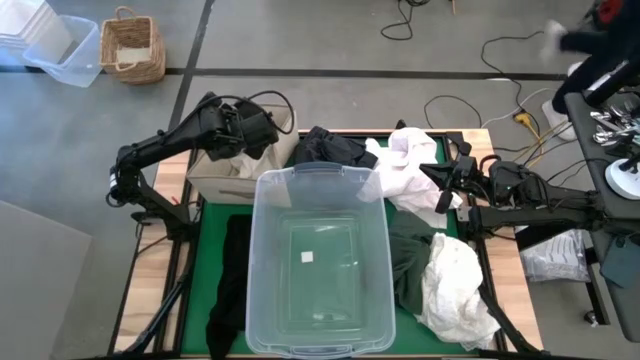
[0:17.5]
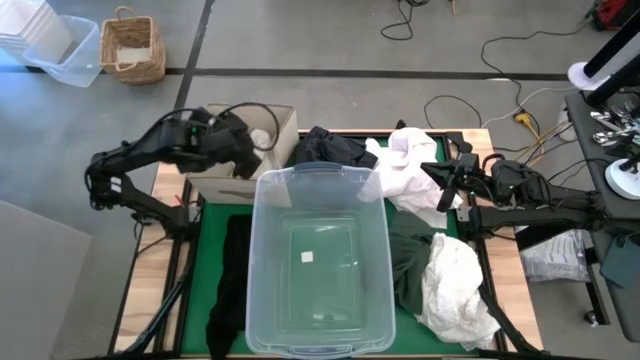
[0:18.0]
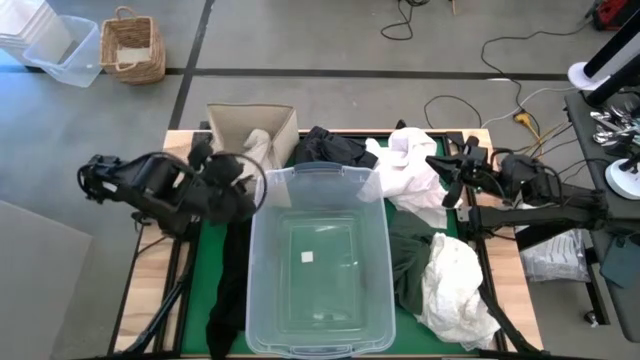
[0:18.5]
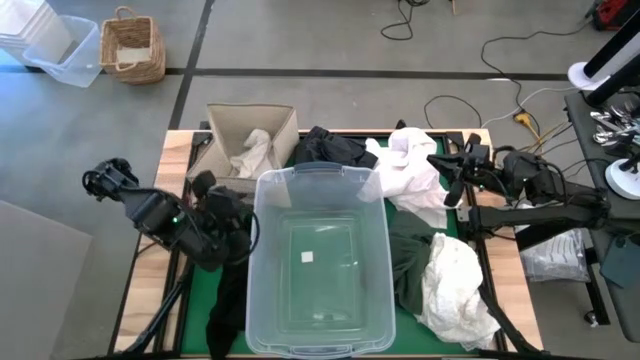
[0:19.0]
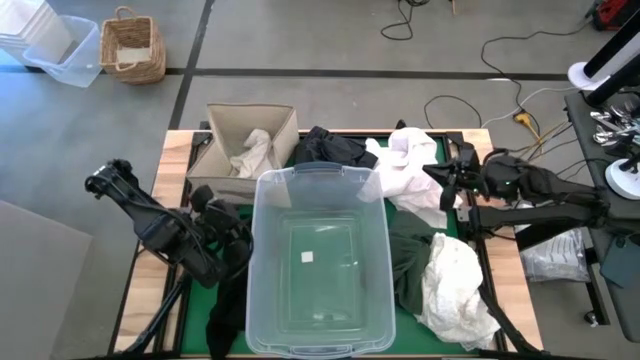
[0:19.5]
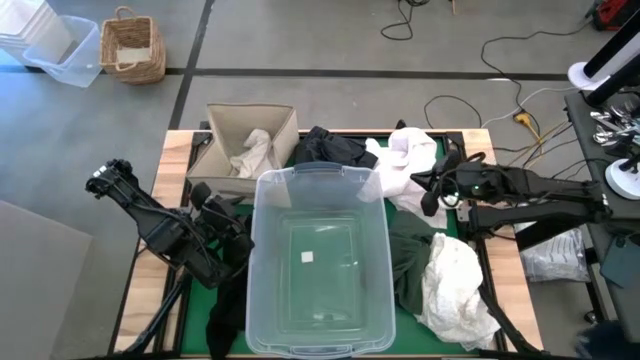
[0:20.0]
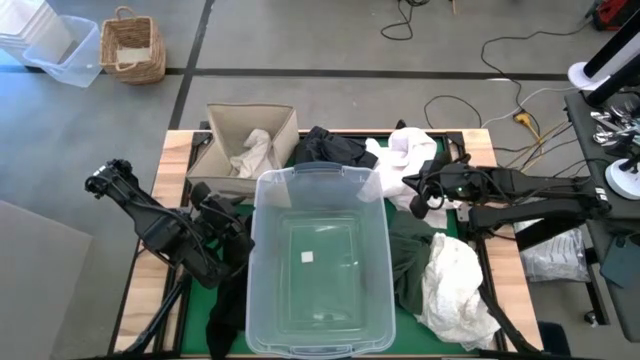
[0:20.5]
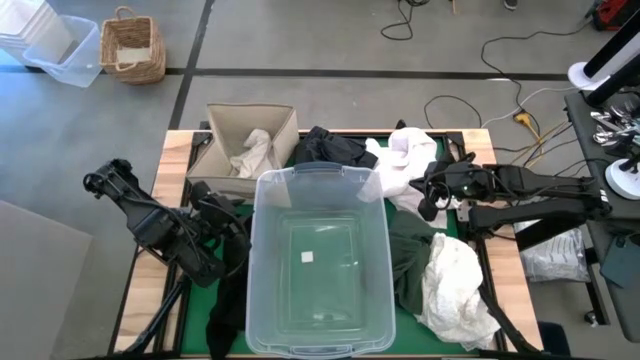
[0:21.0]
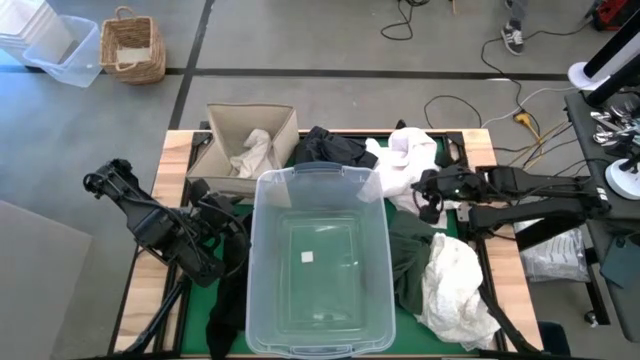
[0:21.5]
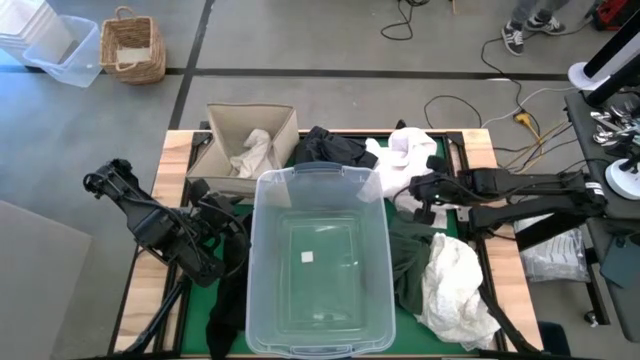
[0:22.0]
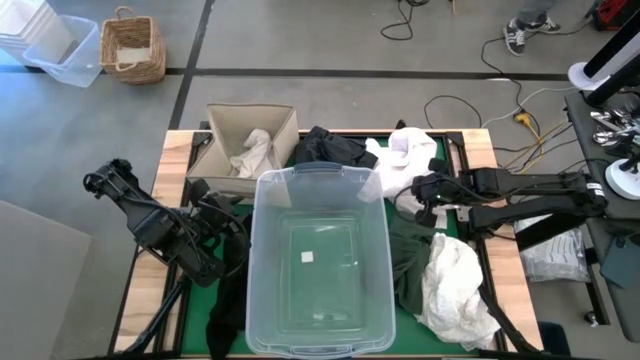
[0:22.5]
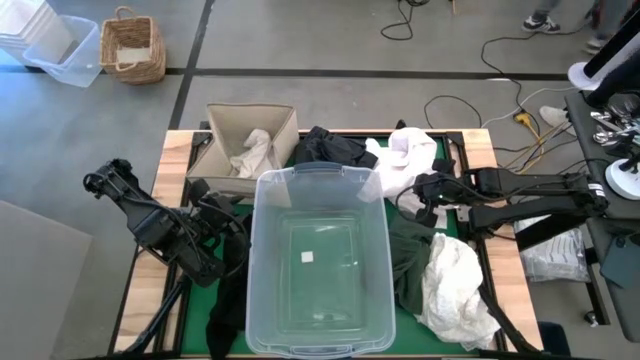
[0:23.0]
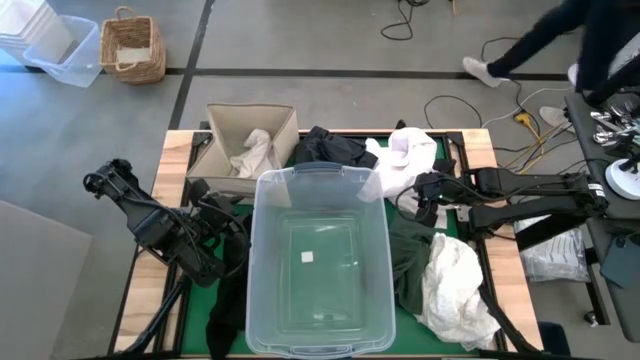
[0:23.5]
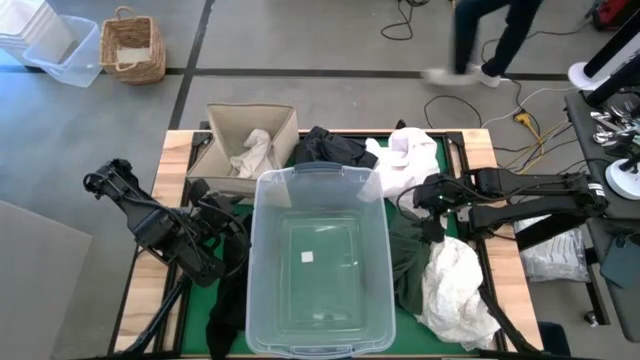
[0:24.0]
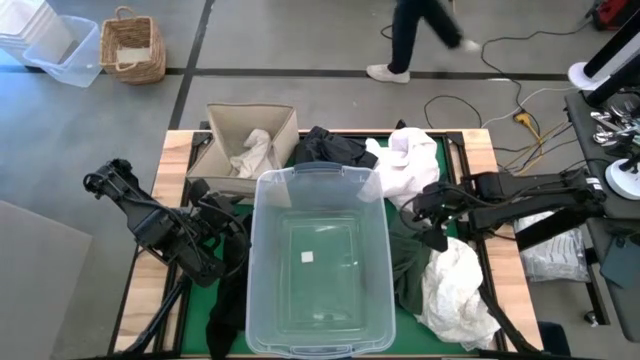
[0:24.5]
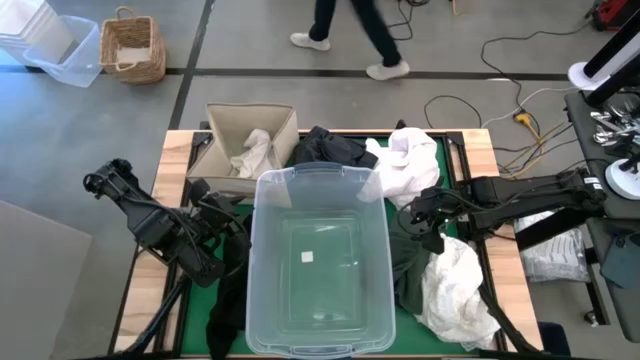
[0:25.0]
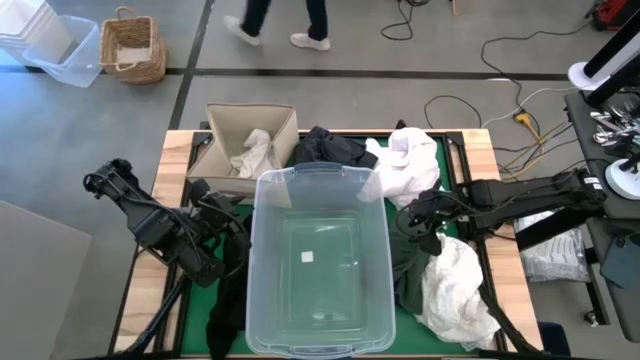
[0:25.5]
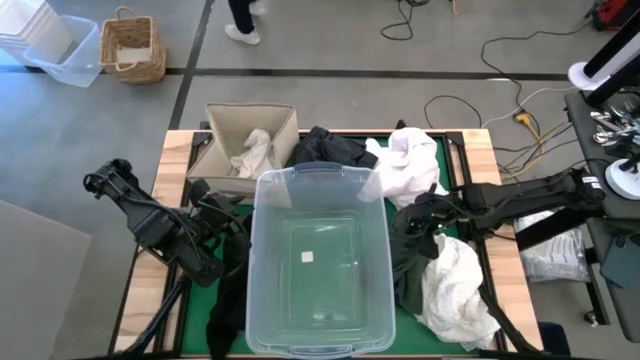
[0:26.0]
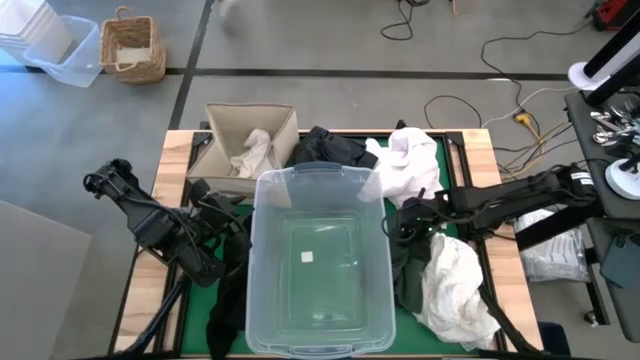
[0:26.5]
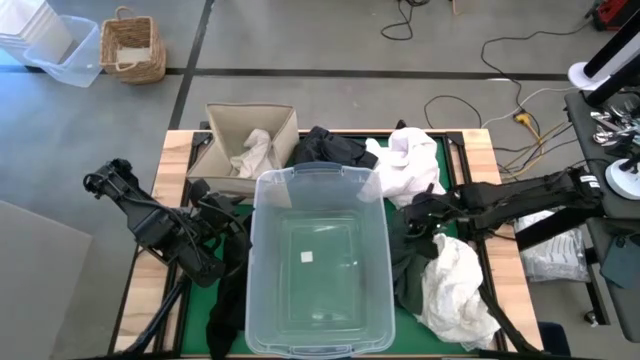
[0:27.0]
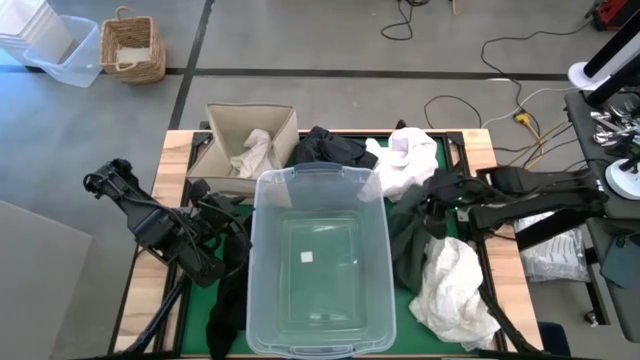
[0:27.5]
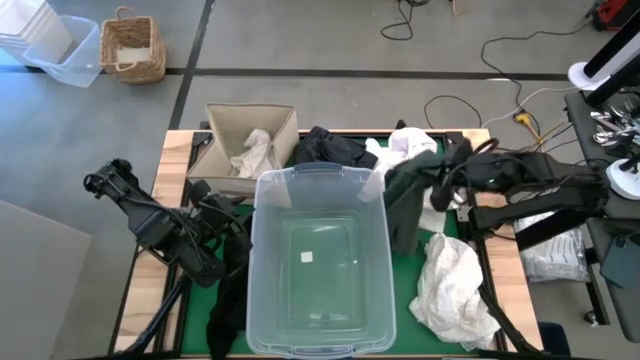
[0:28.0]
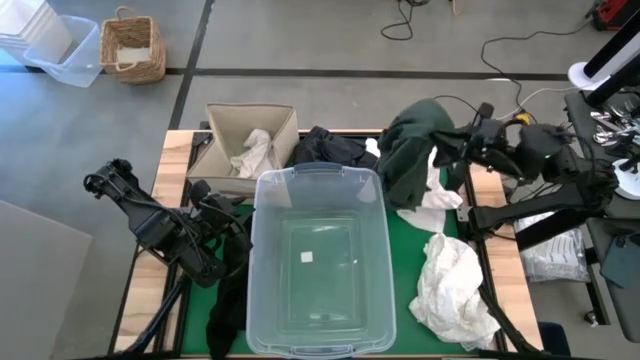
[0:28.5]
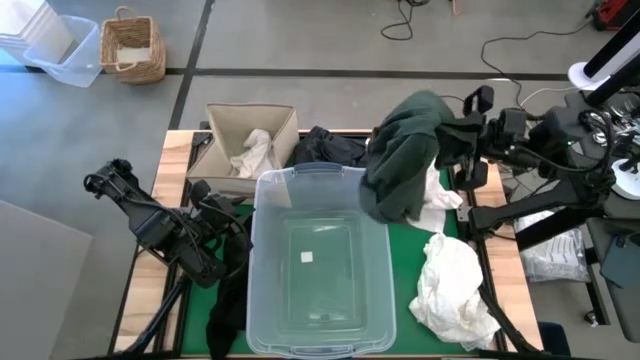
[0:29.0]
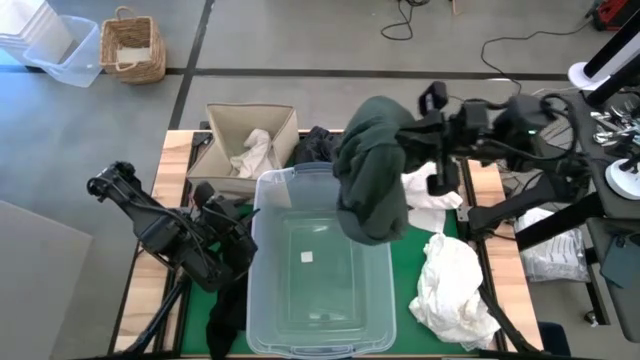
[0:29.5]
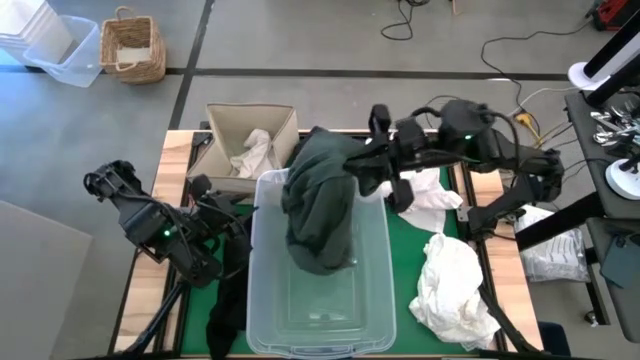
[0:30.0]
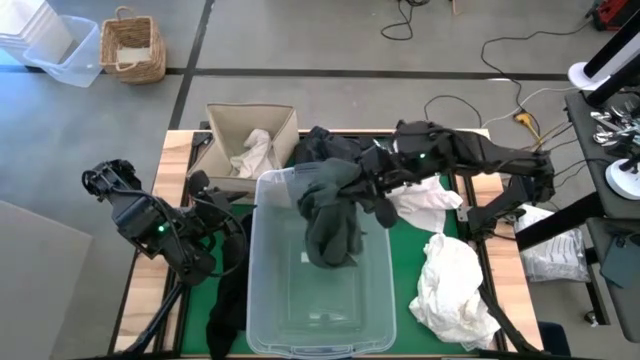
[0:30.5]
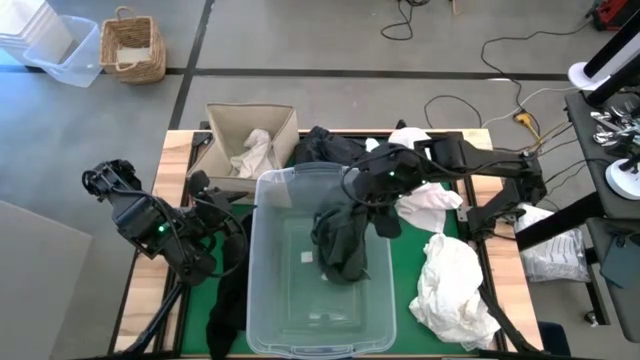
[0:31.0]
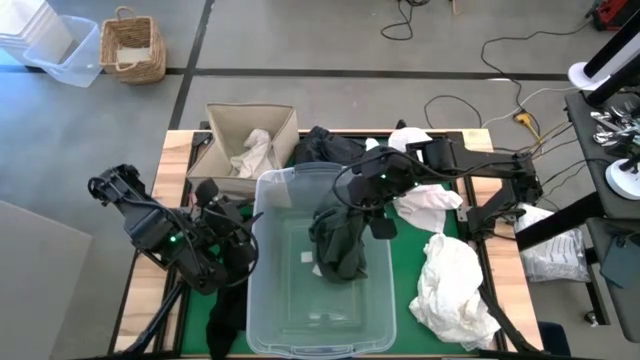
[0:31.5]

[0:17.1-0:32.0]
Put the green shirt into the transparent bin

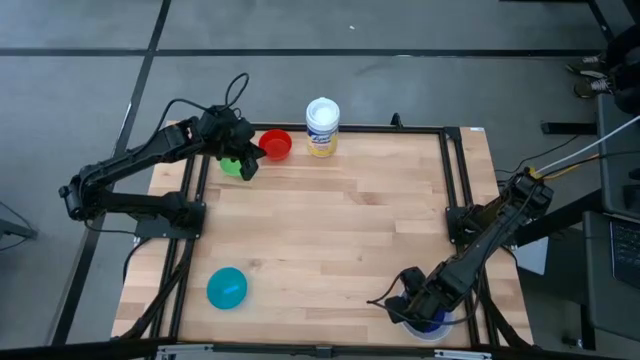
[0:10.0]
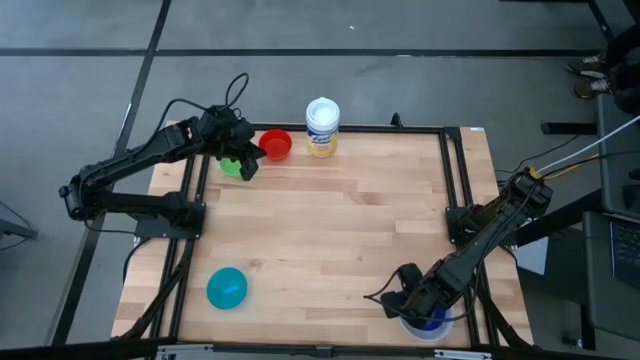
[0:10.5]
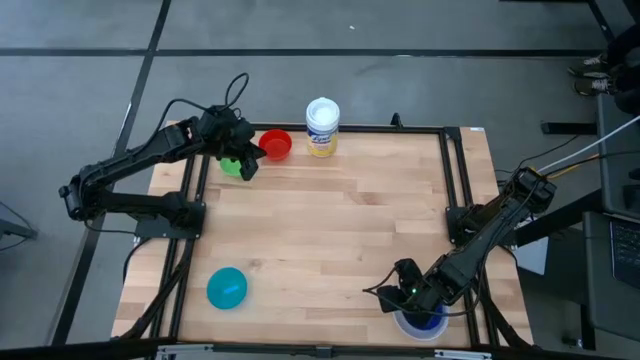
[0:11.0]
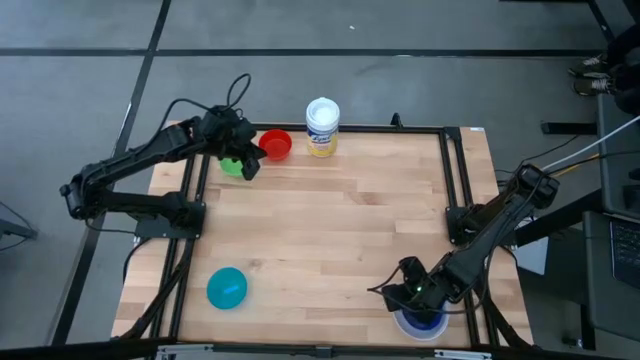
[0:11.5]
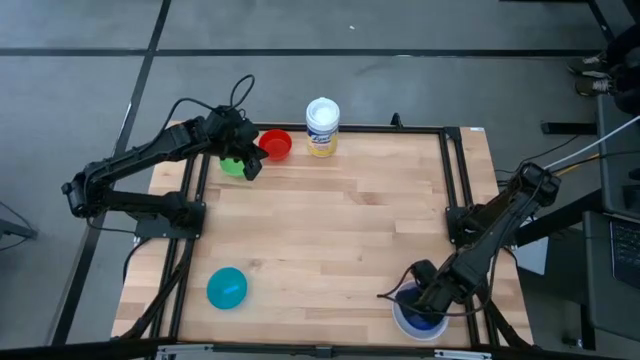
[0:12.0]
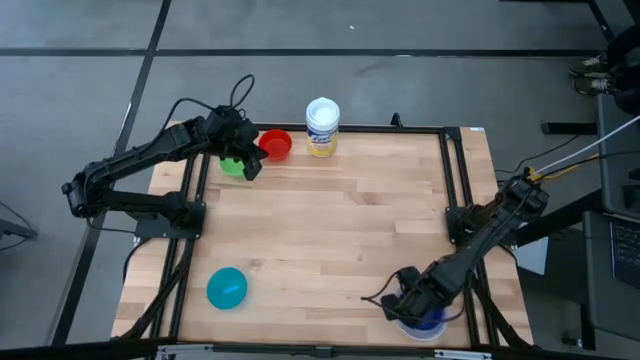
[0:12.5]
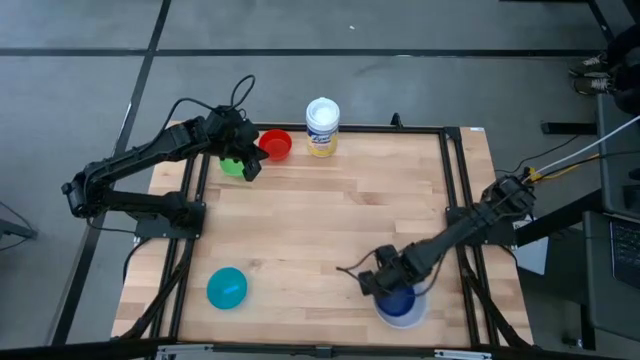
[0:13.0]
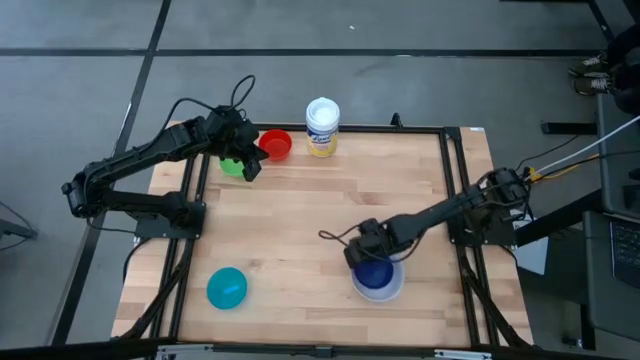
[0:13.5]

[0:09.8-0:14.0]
Move the stacked bowls to the bottom center of the table
